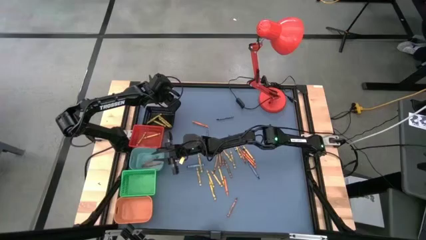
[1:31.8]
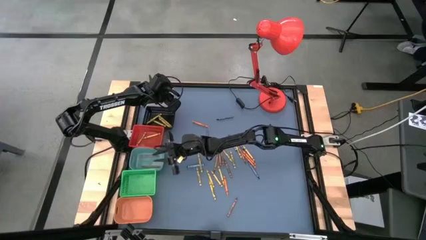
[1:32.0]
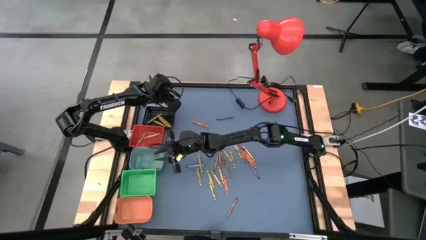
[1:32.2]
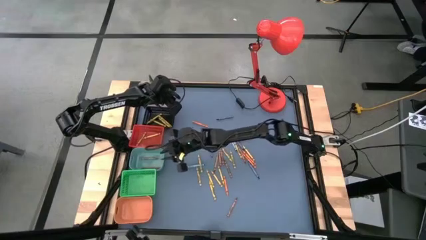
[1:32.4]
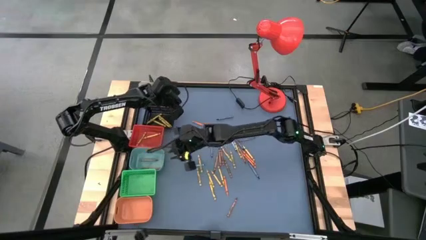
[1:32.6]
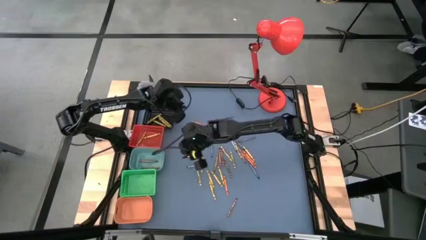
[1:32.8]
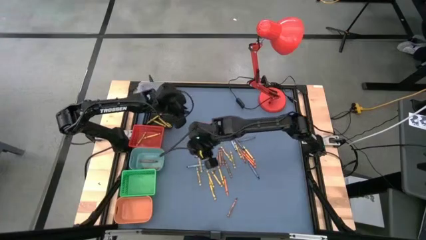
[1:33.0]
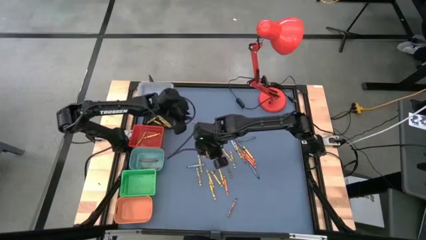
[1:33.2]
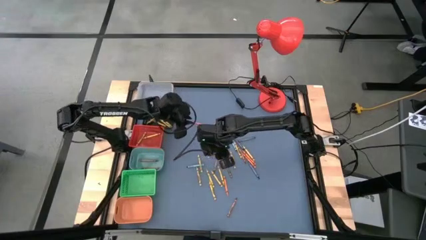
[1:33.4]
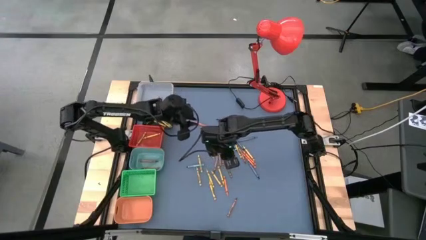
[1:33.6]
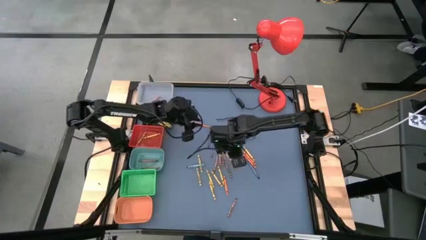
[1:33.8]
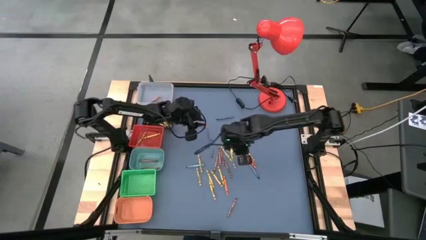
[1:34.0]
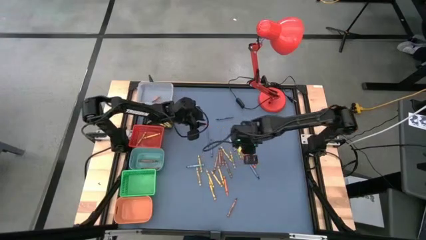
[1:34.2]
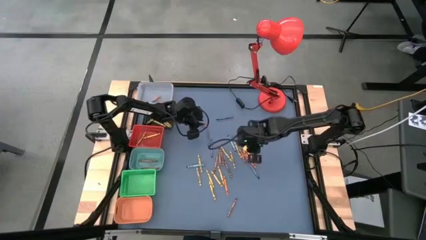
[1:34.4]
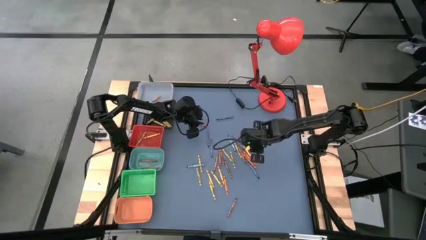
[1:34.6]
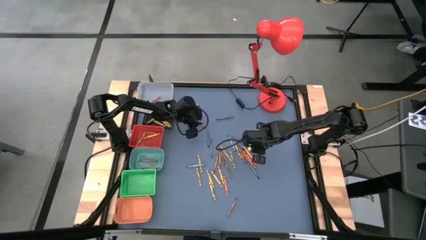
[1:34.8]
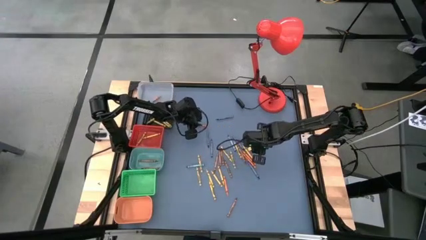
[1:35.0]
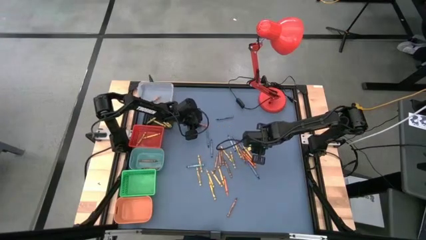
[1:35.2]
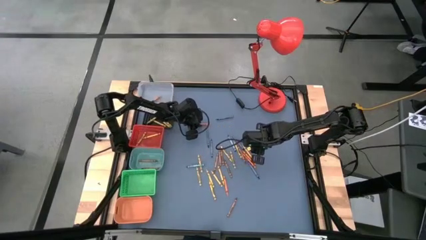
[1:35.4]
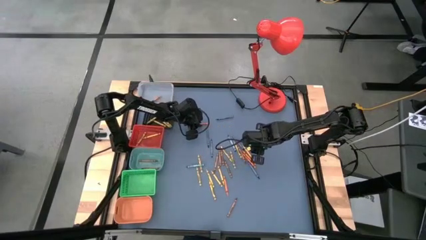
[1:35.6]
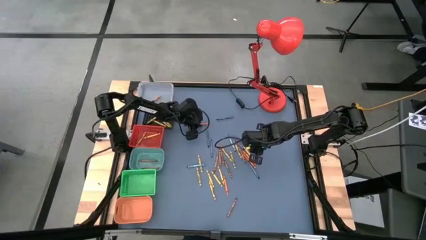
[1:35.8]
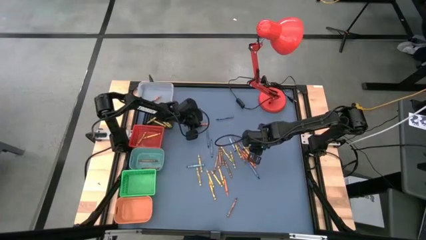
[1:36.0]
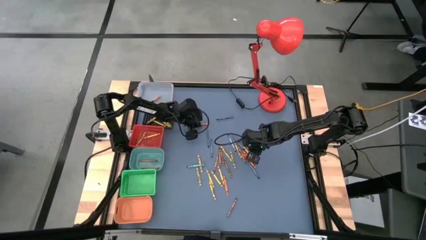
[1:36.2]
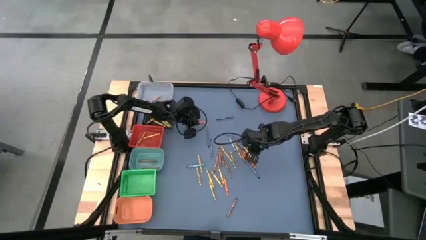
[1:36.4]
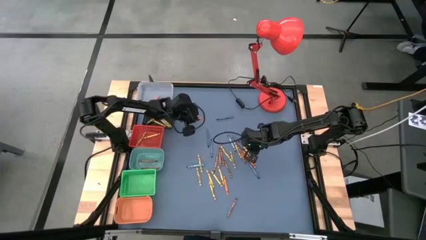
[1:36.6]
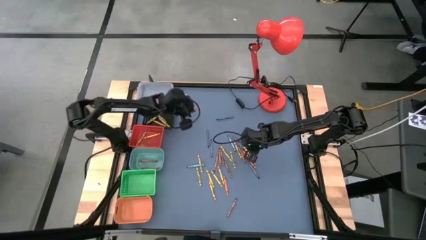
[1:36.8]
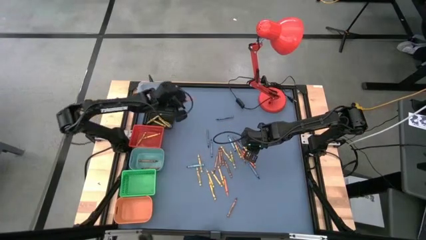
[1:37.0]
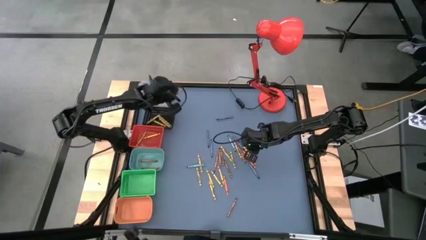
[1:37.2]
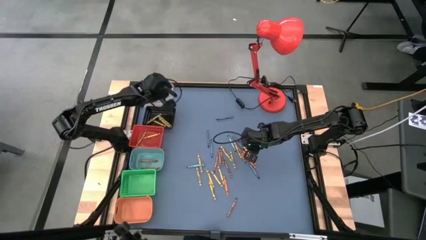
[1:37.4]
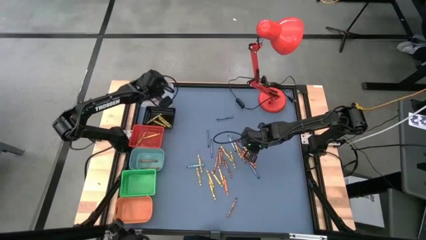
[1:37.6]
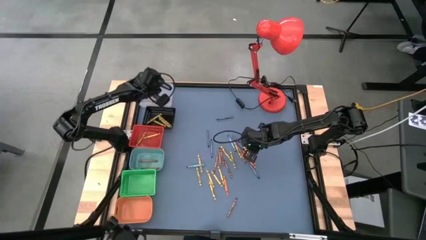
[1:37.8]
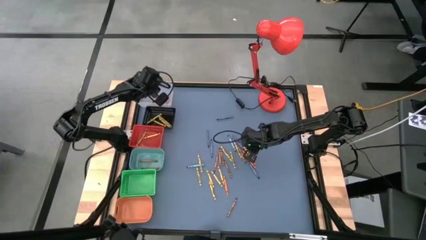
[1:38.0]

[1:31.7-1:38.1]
Task: Sort crayons
Put the orange crayon into the transparent bin

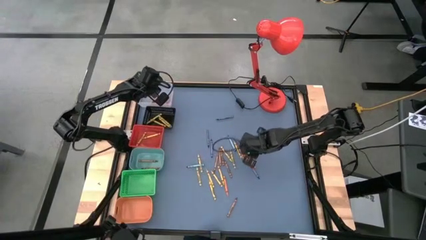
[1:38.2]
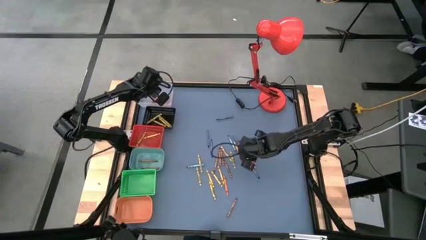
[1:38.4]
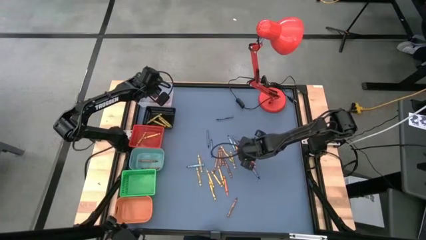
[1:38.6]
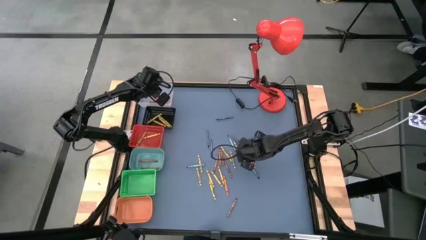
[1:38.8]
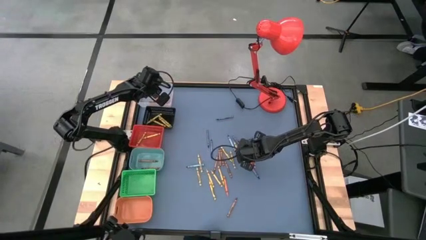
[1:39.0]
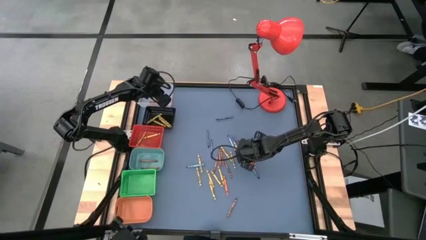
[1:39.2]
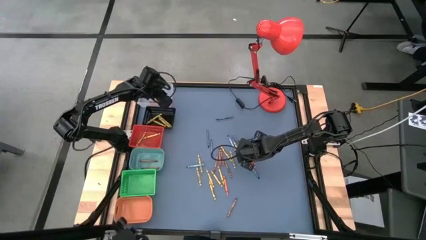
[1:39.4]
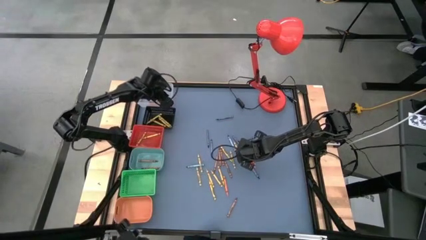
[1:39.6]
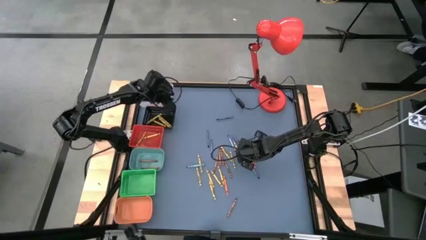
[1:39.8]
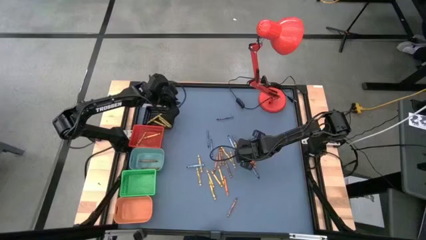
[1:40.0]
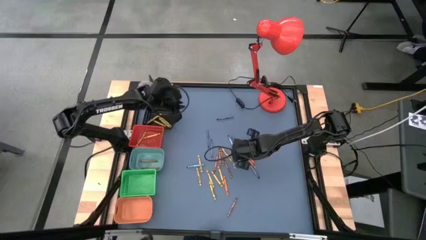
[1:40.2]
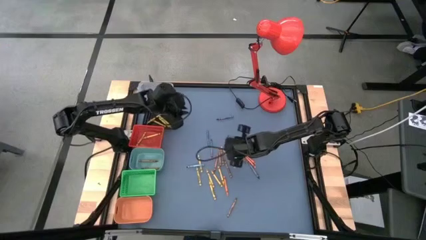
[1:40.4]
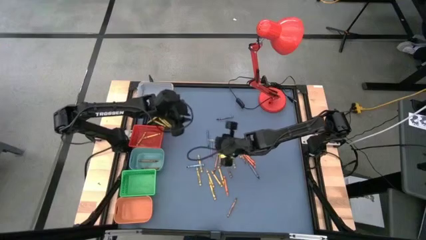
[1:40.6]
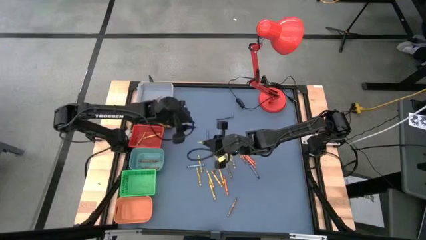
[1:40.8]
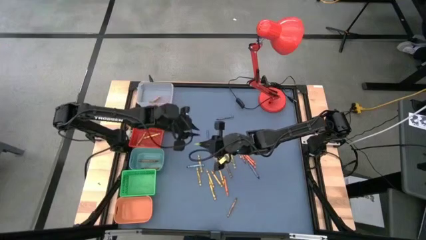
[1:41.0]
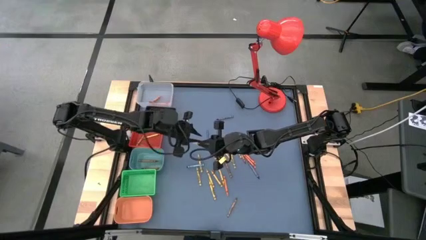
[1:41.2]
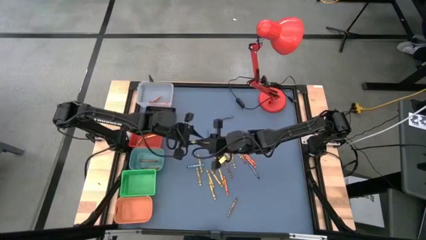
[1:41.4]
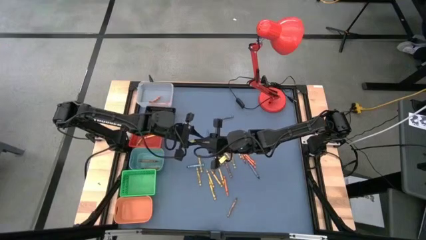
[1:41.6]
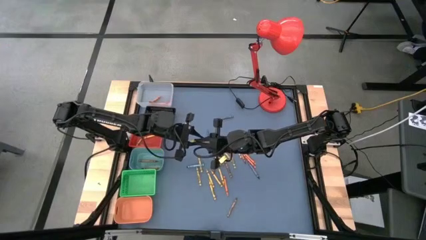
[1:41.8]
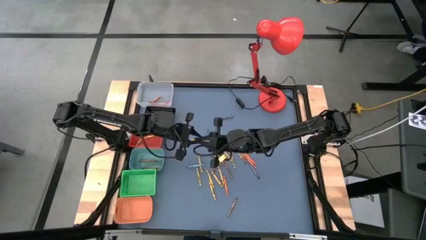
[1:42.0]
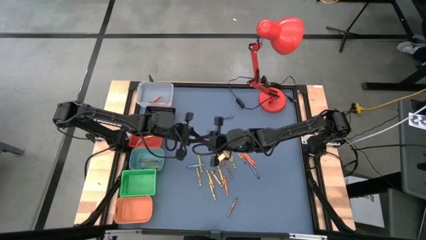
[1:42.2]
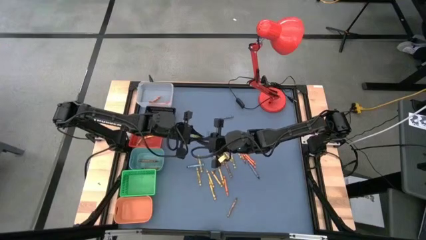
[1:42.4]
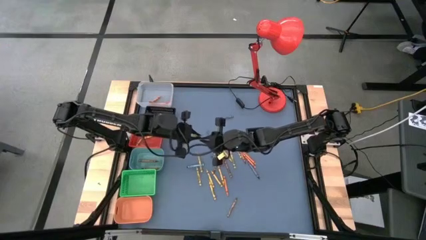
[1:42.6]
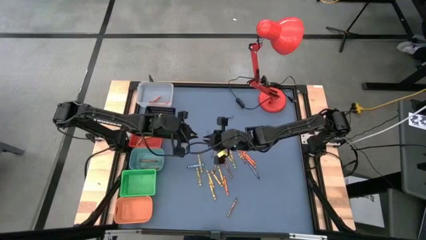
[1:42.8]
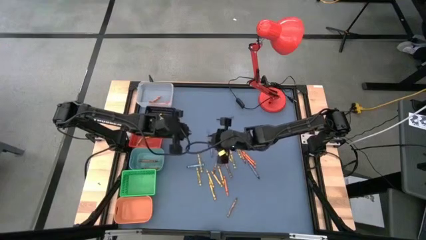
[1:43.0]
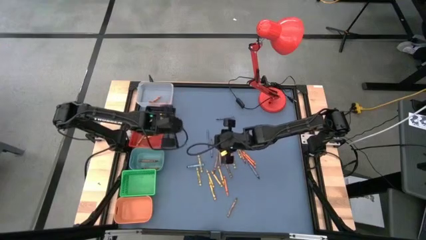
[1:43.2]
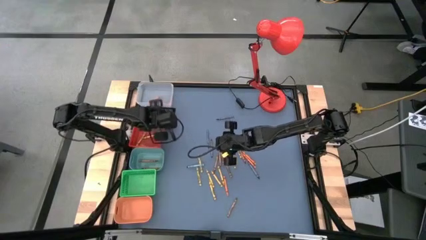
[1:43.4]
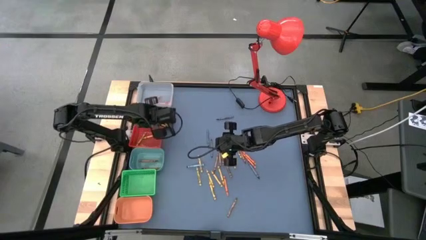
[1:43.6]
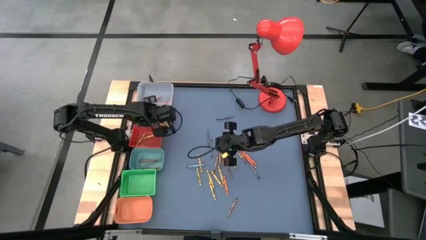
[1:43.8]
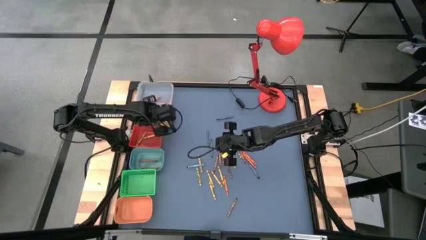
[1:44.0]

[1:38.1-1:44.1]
Put the green crayon into the black bin

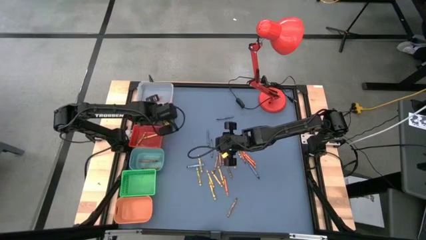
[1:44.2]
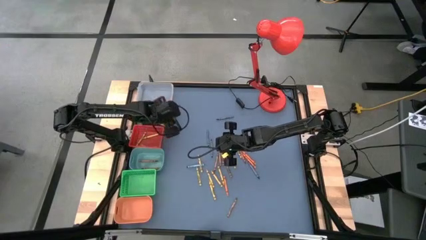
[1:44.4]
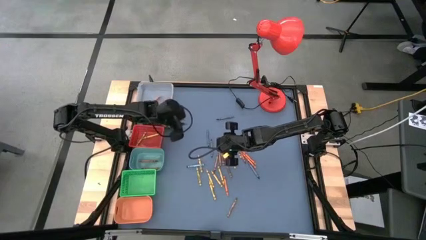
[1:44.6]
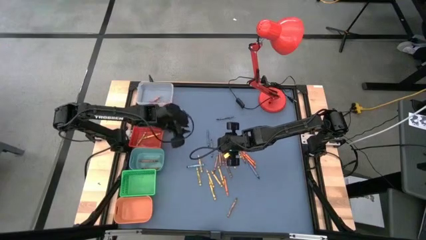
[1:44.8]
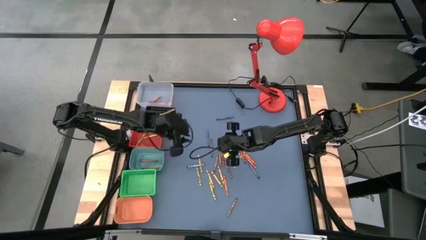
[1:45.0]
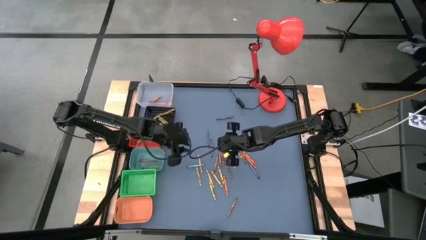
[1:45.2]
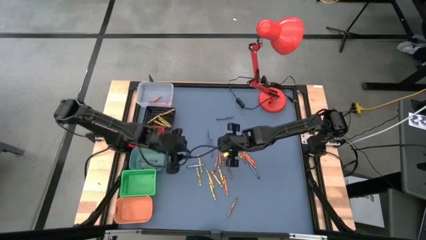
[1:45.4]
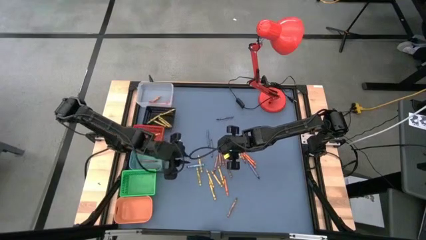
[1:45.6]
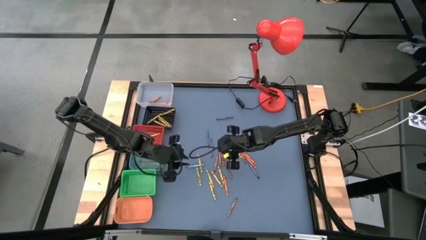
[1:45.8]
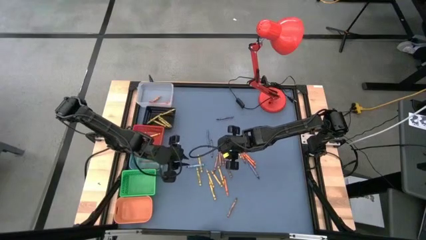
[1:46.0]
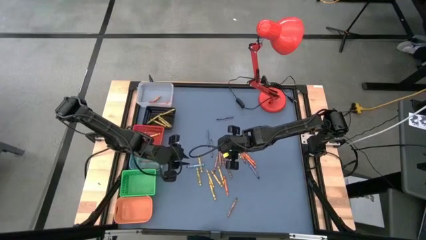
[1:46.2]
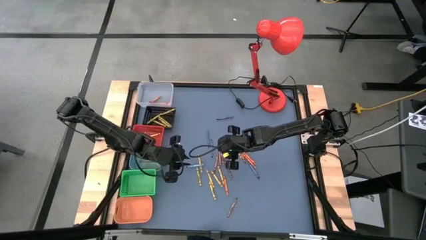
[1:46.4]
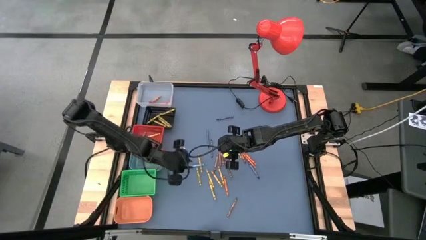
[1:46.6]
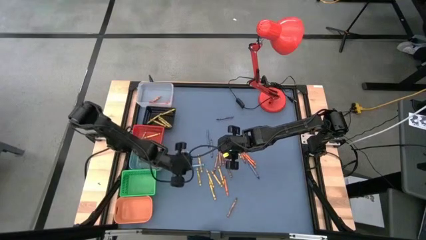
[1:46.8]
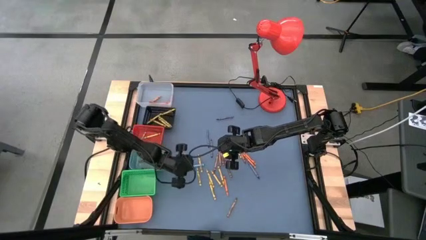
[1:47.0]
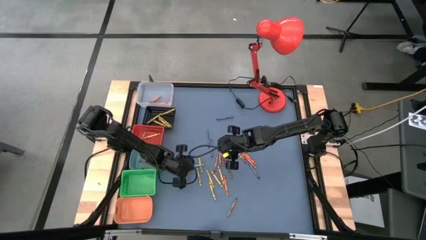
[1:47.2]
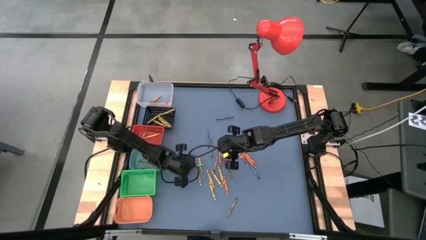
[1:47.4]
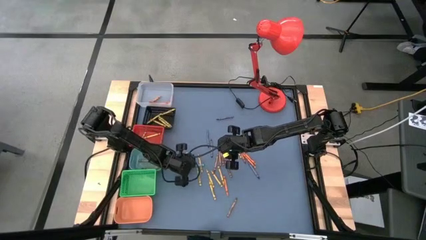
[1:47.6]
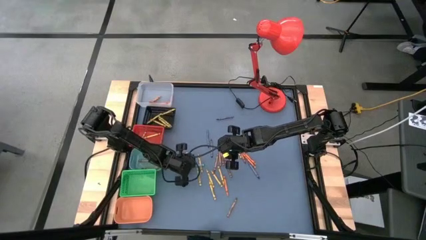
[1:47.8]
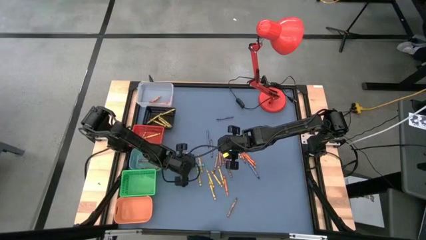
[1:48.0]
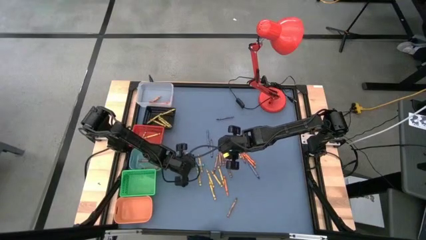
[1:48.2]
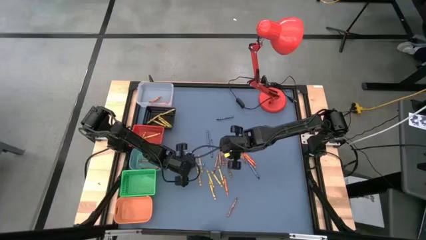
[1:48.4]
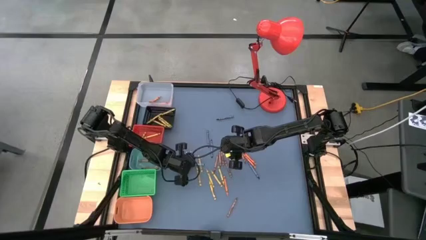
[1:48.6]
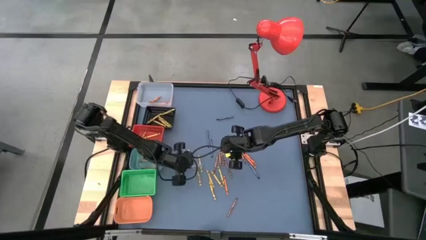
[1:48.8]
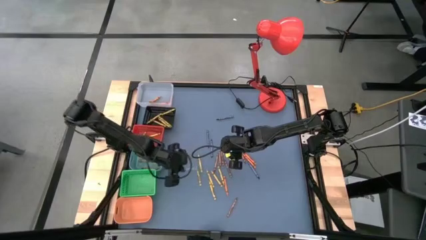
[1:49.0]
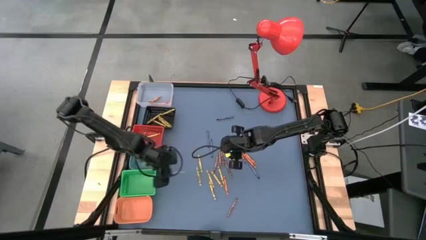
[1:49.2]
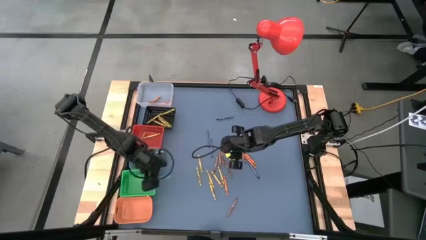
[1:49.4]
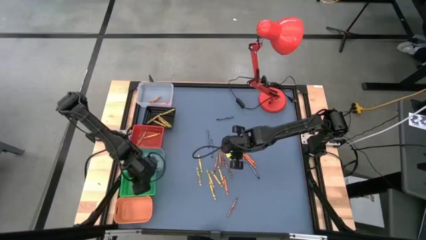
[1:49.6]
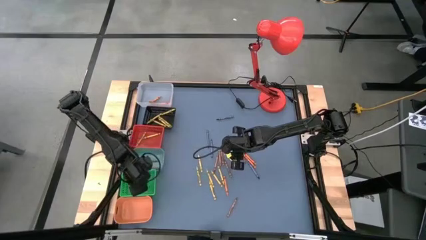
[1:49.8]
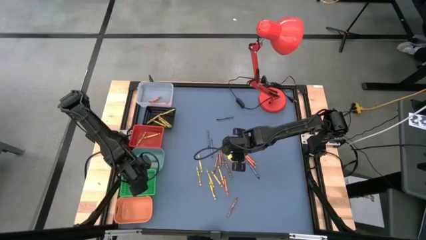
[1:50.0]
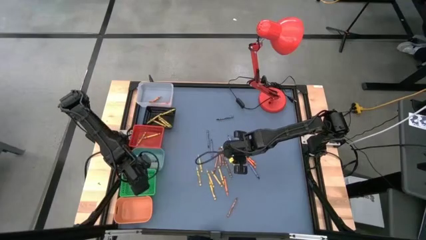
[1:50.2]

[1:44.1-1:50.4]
Put the blue crayon into the green bin
